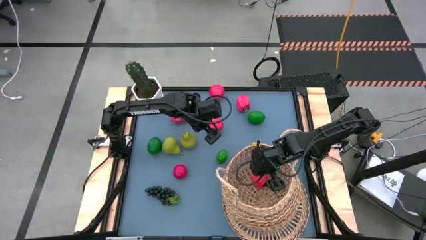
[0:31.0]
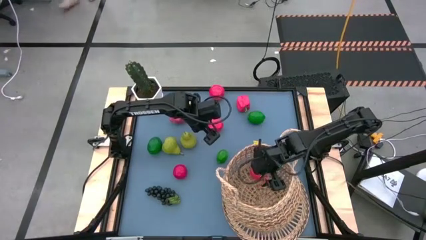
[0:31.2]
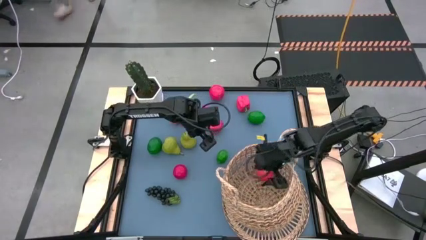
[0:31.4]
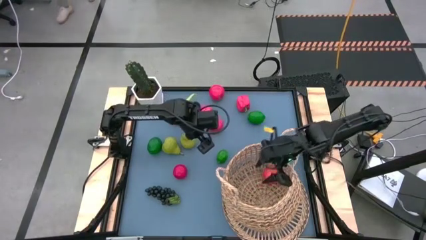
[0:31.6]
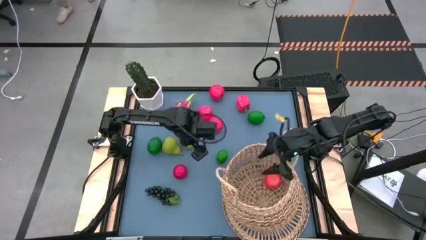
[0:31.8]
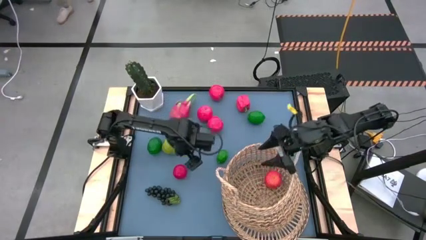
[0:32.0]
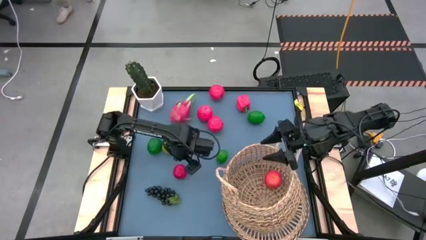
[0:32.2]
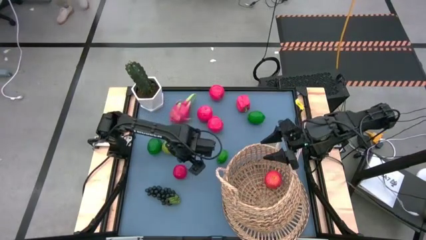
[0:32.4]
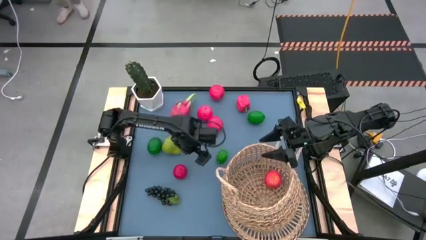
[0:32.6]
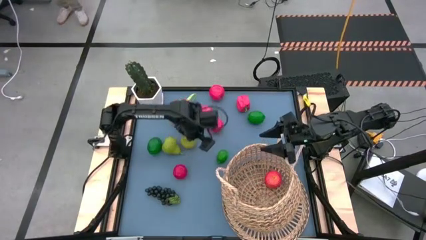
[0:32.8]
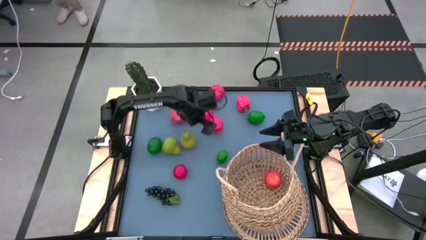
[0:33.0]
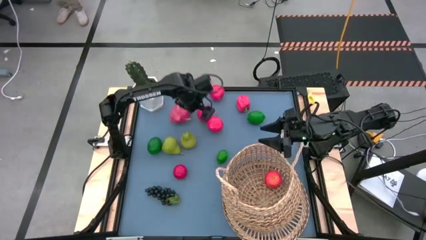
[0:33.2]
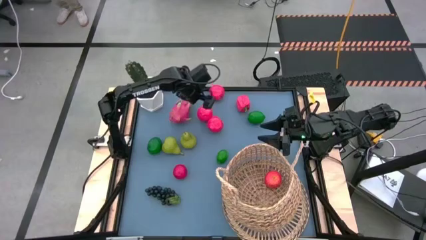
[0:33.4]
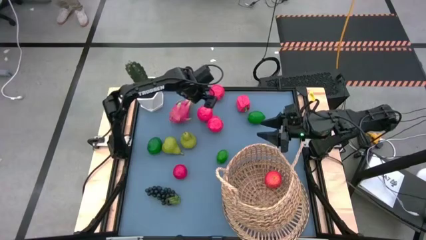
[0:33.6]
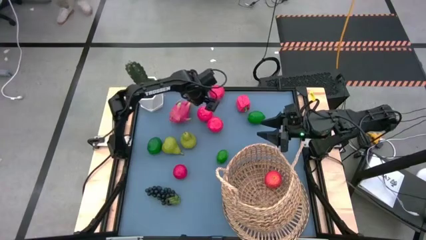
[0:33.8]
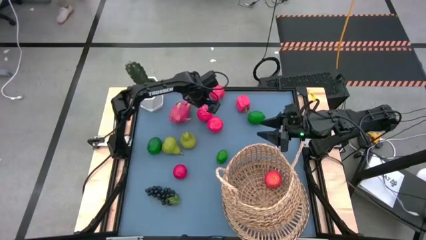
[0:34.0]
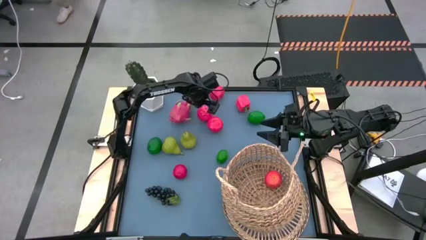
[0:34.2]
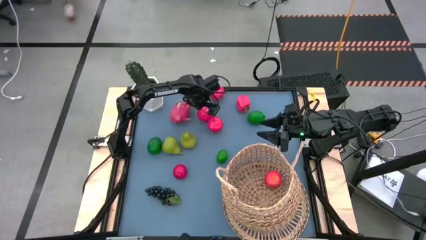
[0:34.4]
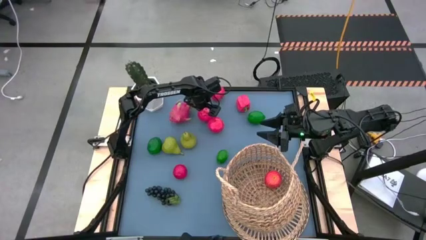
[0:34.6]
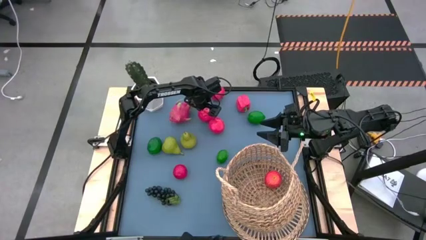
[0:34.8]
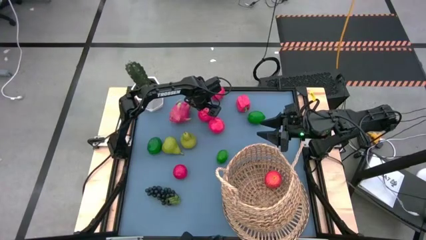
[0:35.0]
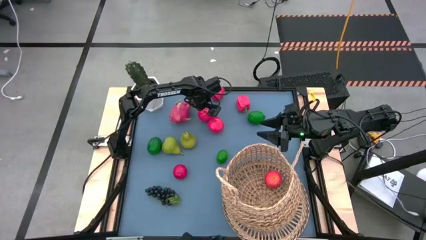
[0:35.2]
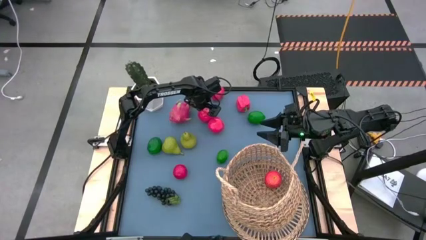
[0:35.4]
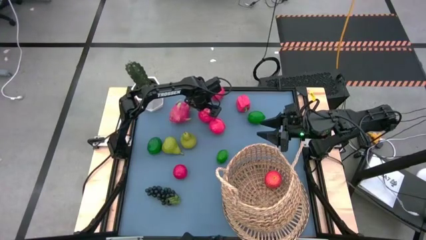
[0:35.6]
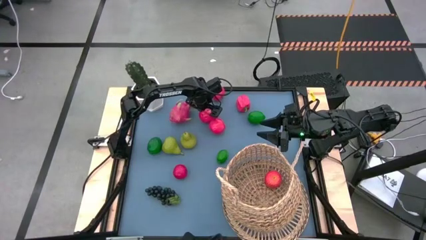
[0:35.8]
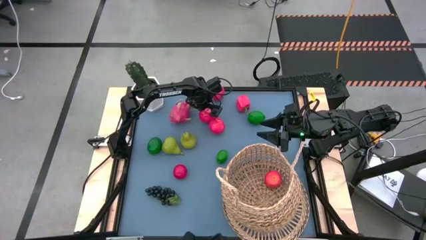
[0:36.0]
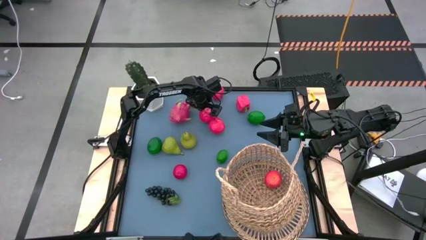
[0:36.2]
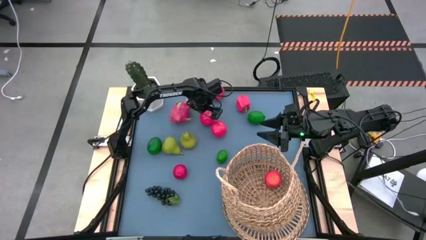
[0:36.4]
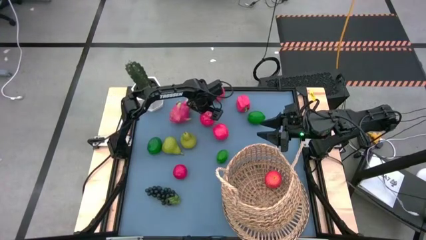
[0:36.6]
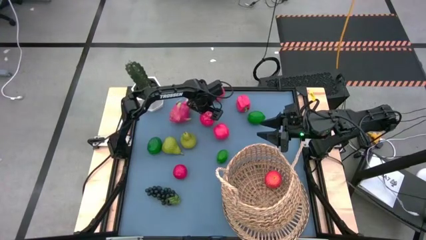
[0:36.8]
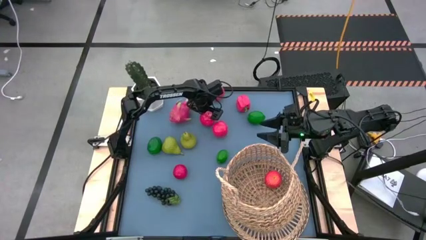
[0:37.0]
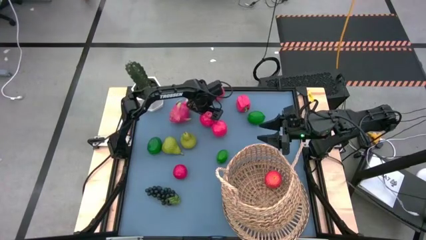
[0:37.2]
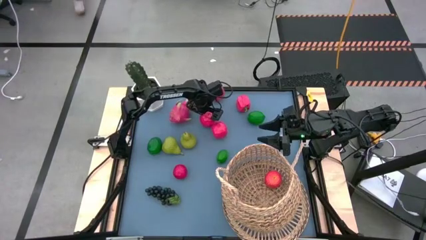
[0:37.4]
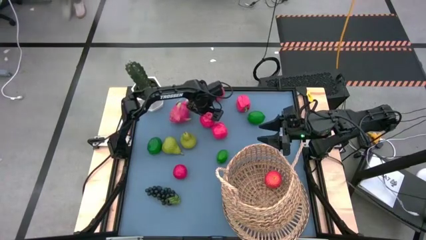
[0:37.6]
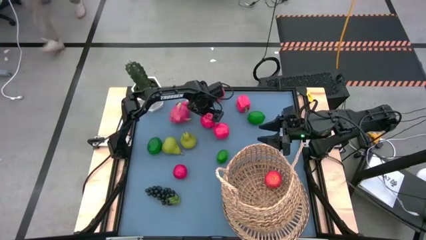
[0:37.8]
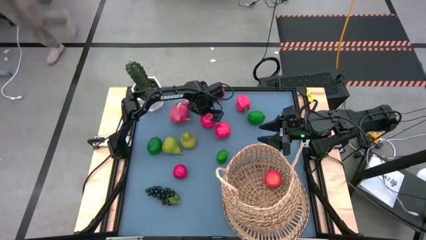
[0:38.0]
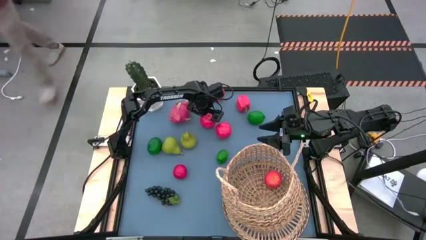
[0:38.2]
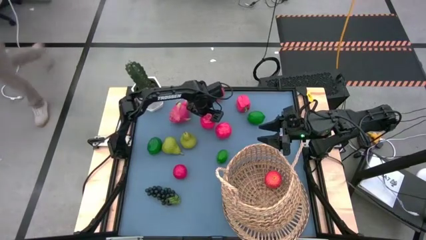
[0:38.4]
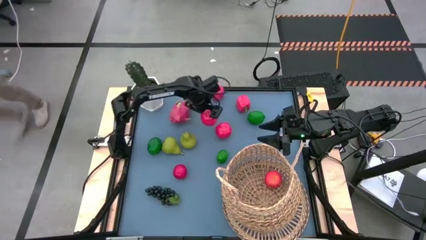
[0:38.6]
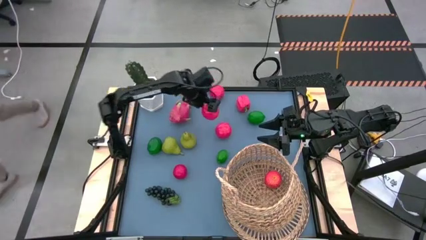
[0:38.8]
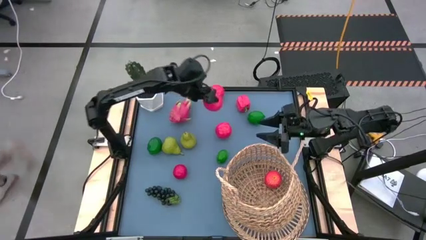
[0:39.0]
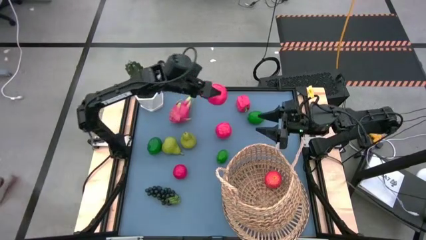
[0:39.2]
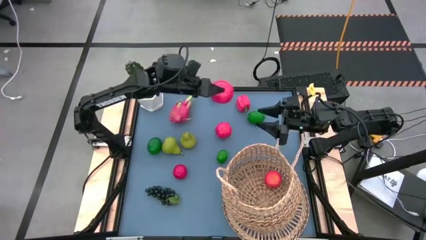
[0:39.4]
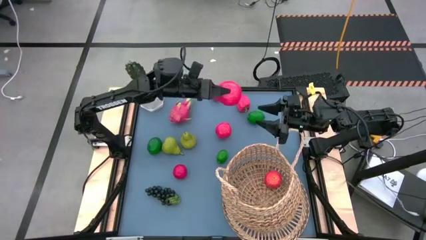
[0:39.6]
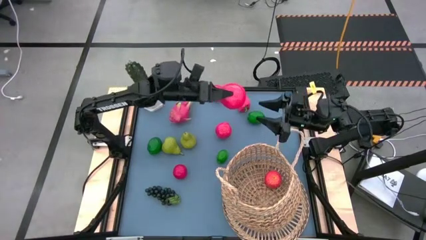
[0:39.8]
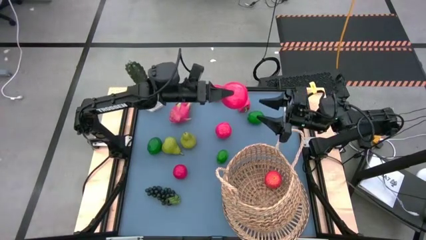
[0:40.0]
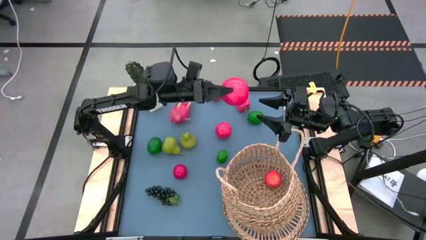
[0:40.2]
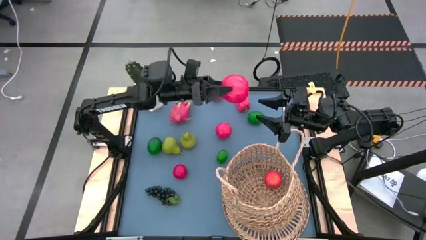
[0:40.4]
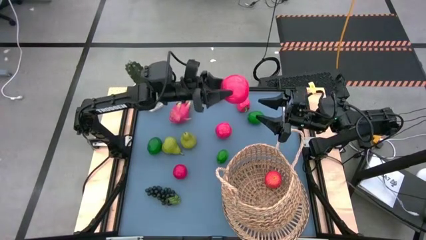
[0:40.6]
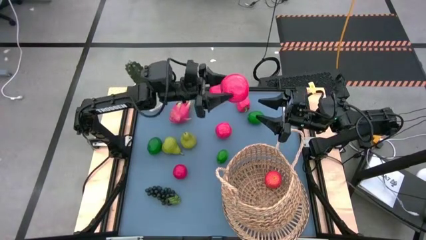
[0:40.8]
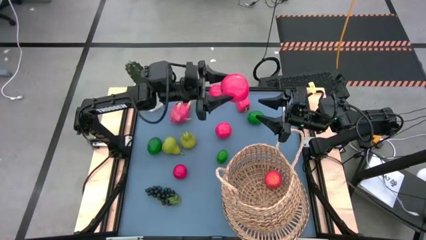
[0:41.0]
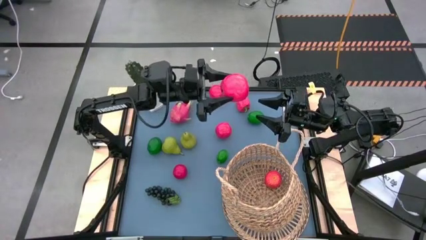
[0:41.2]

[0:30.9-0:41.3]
Task: Build produce basket
Put the red apple into the brown basket

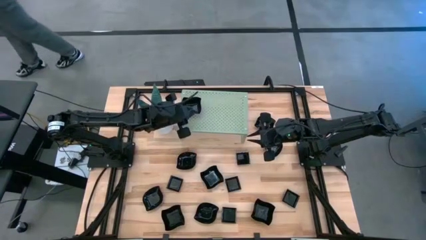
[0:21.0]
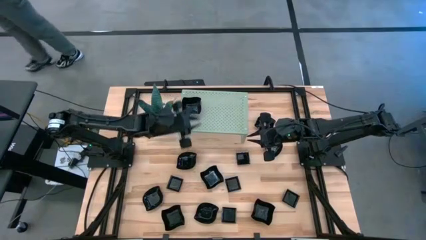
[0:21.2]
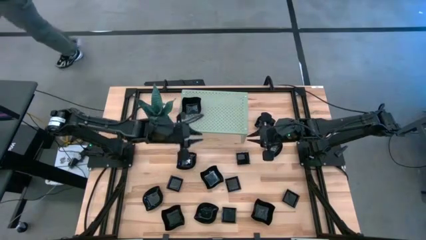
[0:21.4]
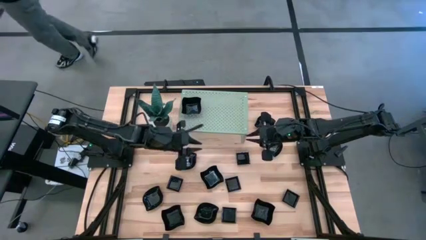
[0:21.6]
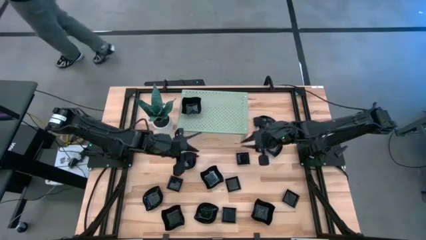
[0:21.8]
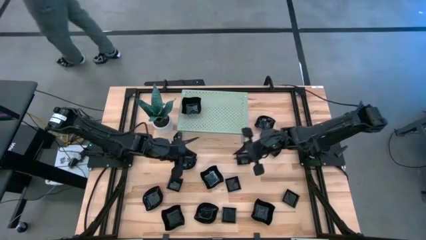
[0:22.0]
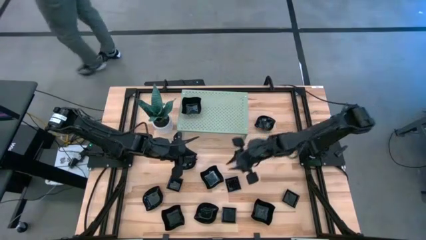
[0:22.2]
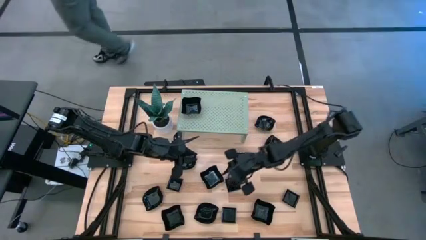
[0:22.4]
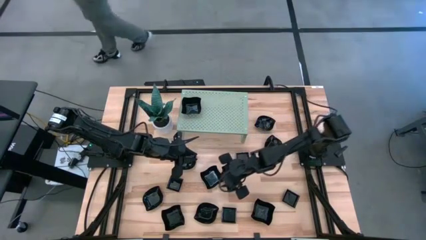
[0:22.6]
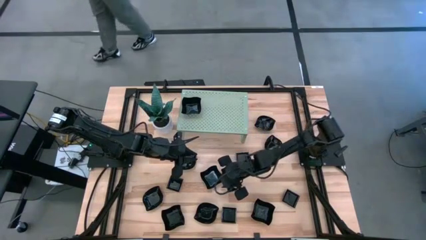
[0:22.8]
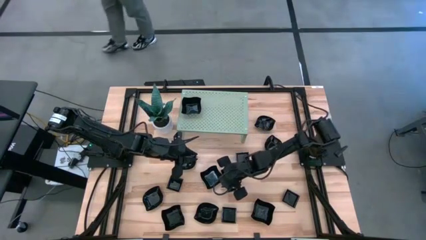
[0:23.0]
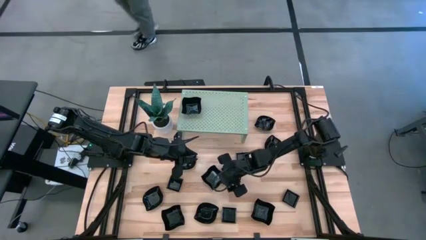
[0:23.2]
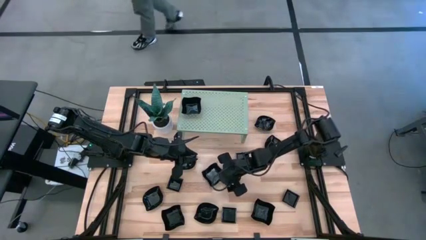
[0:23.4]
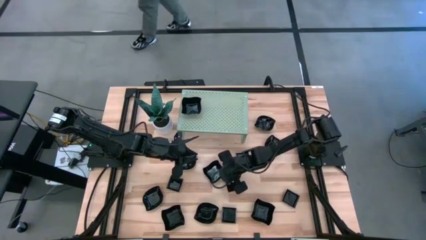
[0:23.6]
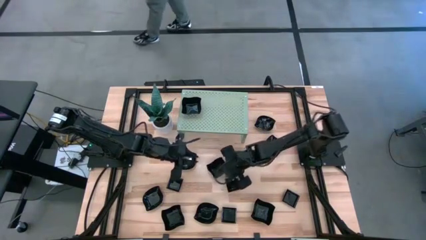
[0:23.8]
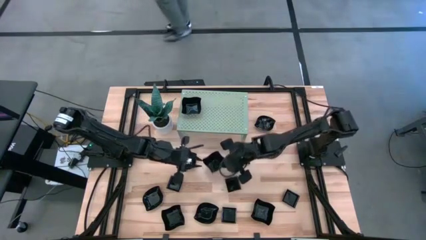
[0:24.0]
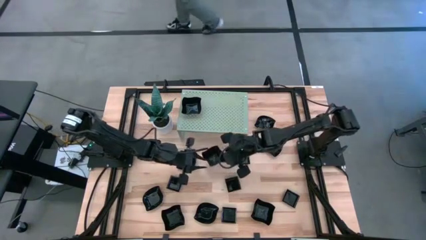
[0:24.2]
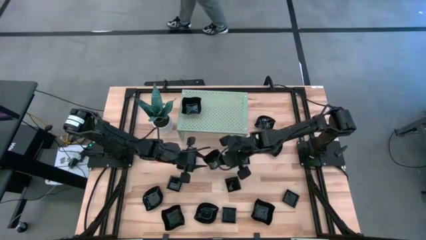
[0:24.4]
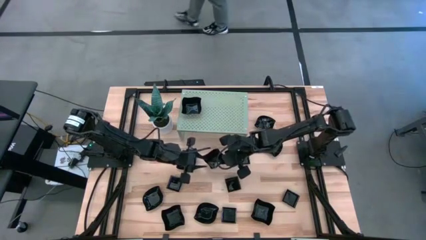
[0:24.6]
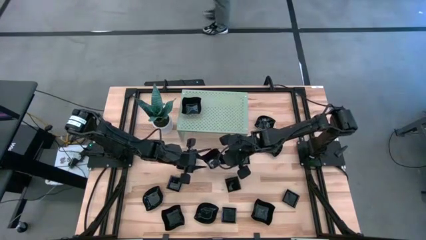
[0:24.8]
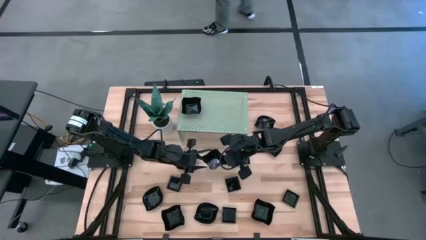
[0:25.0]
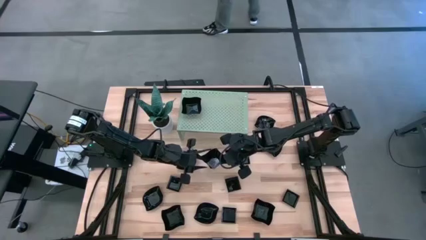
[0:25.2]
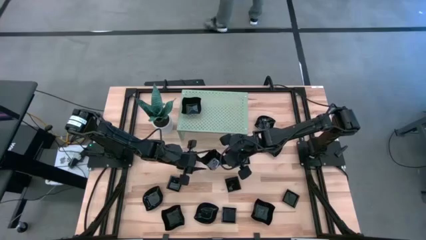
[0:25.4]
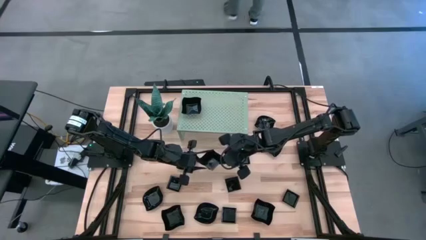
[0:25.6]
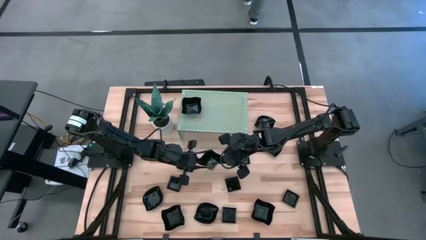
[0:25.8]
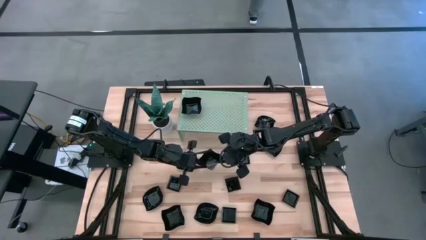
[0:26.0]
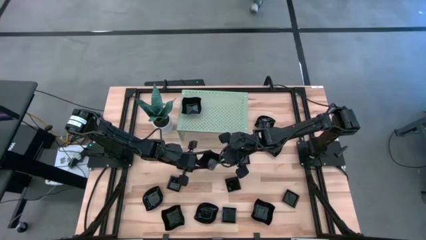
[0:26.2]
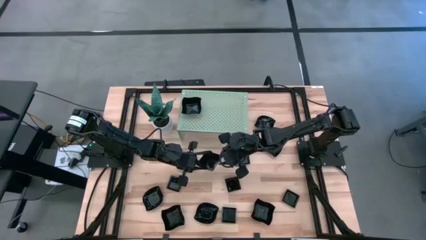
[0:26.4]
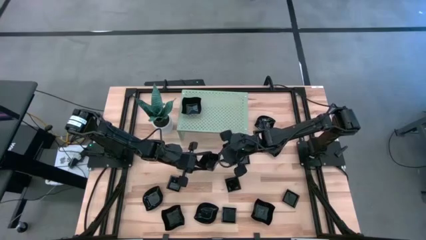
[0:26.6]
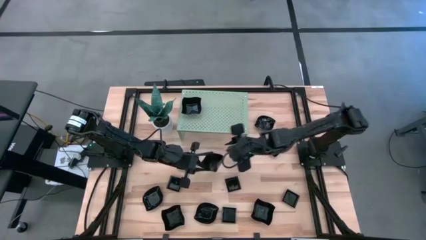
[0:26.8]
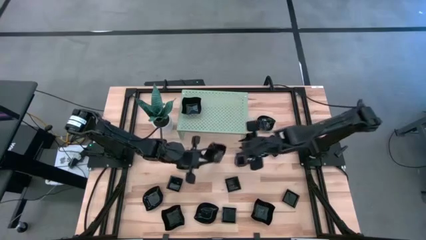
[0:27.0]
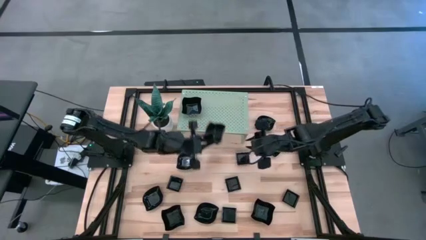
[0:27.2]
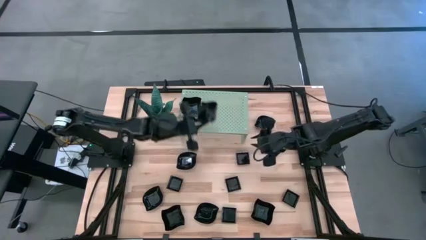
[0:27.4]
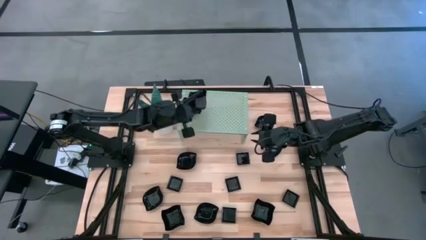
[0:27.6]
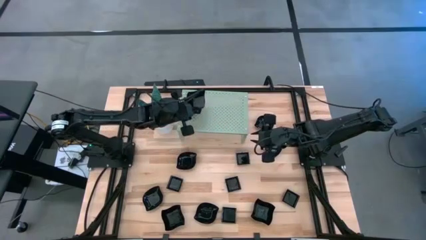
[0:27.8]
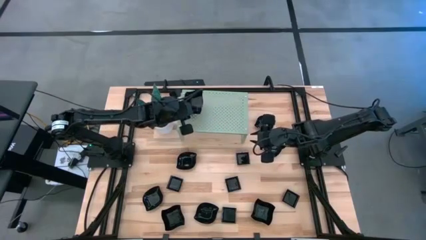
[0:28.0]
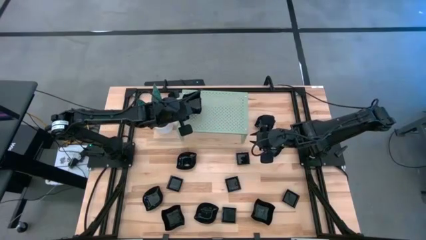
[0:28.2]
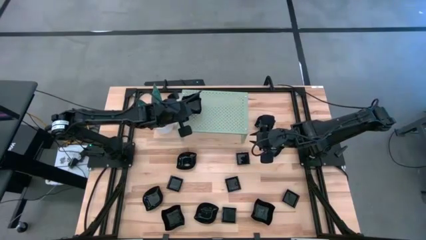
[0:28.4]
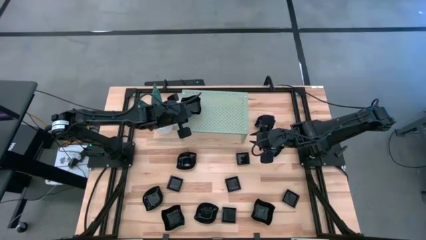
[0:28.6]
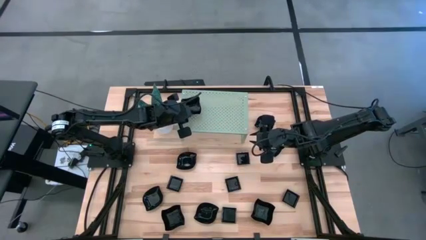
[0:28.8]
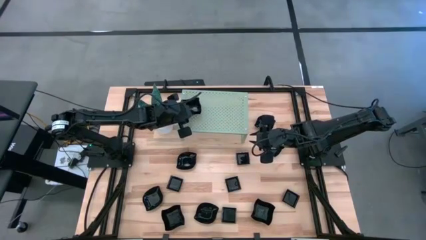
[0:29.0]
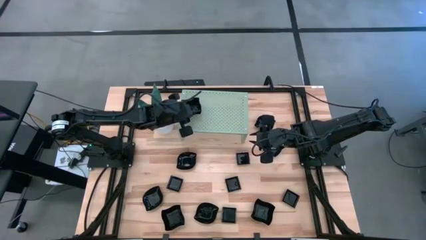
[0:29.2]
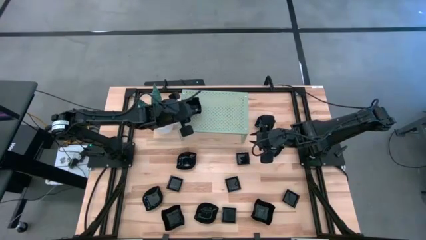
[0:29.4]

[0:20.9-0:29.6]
Task: Pick & Place Mini shaped plates
Stack the distorted square plate on top of the other distorted square plate on the shelf
